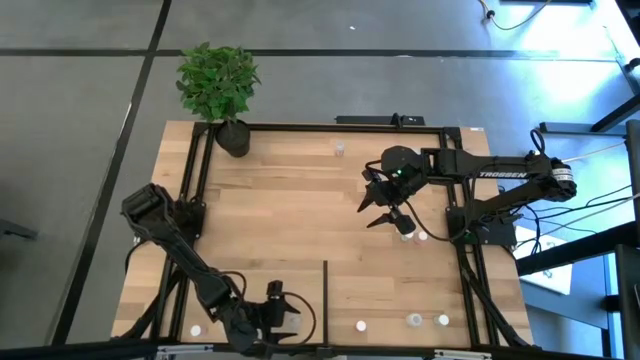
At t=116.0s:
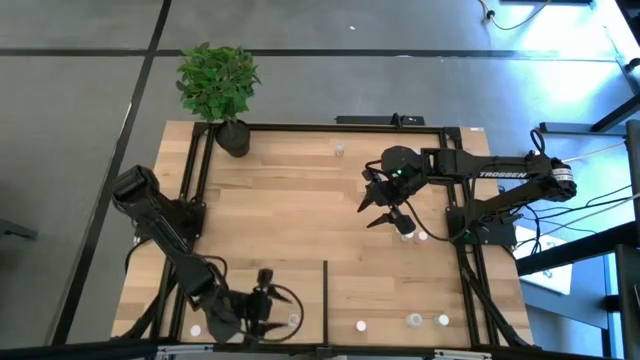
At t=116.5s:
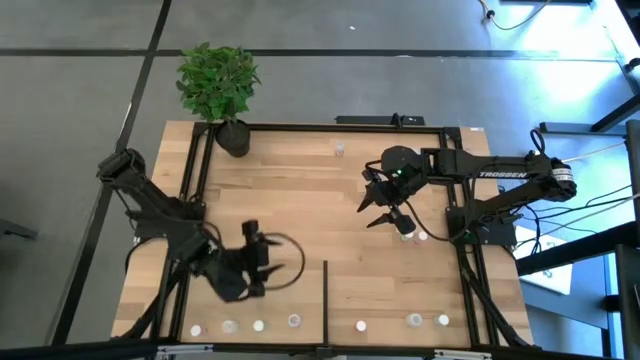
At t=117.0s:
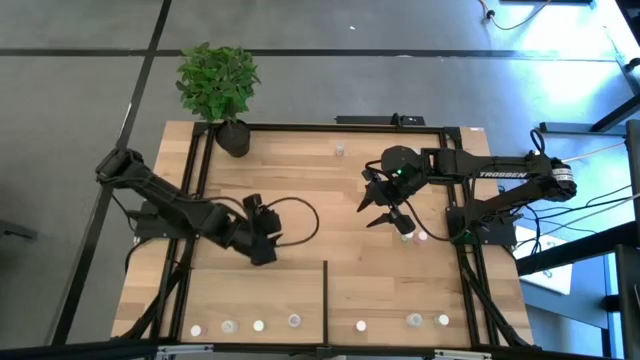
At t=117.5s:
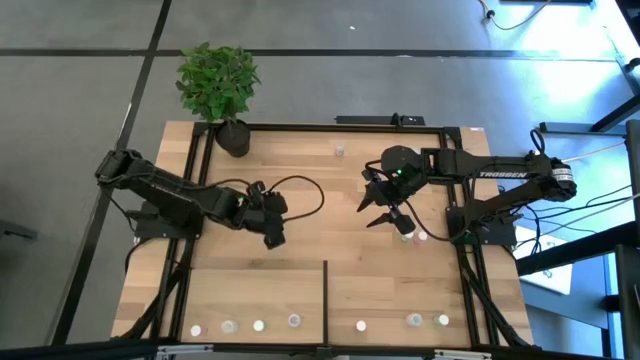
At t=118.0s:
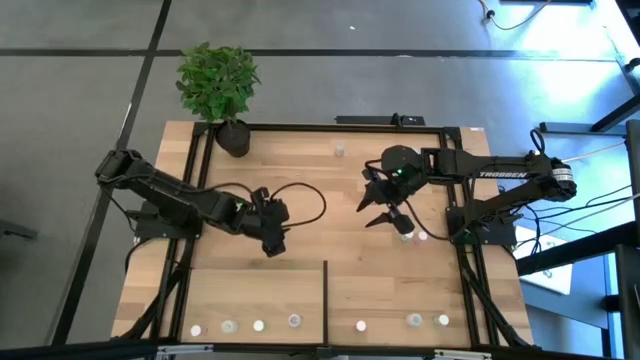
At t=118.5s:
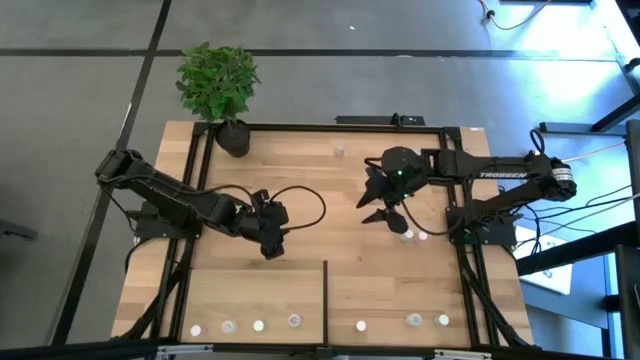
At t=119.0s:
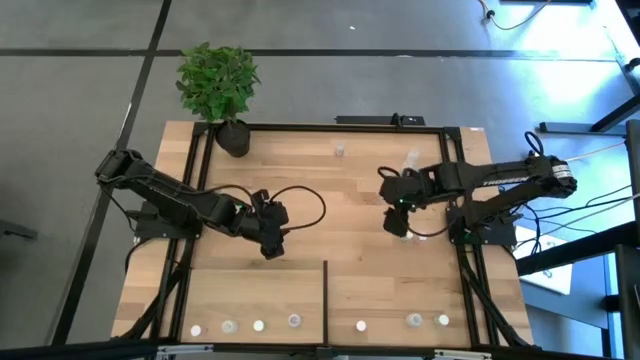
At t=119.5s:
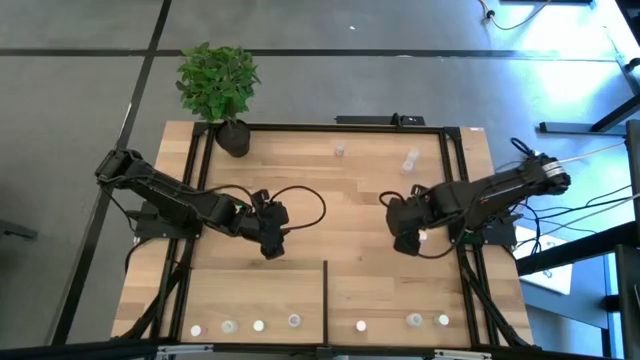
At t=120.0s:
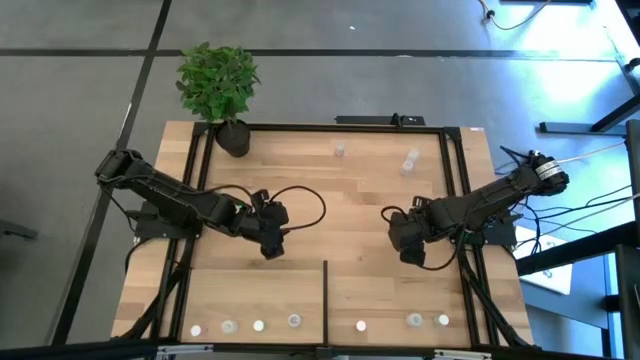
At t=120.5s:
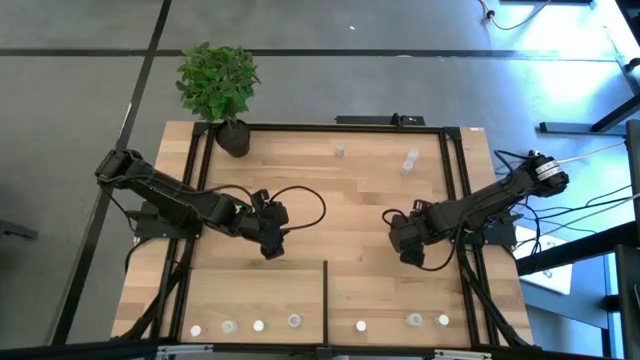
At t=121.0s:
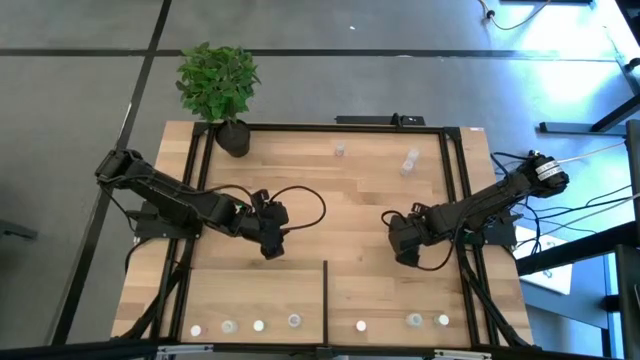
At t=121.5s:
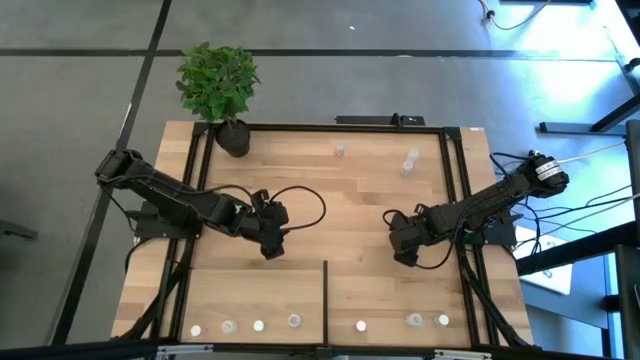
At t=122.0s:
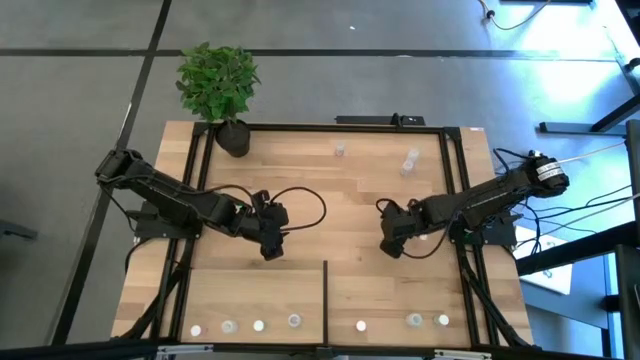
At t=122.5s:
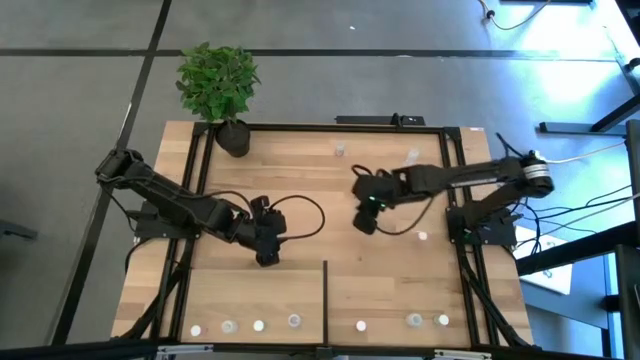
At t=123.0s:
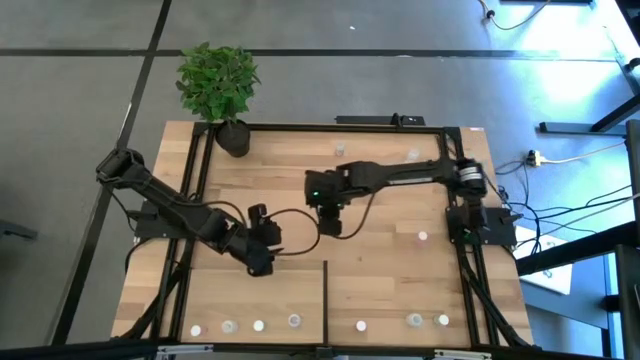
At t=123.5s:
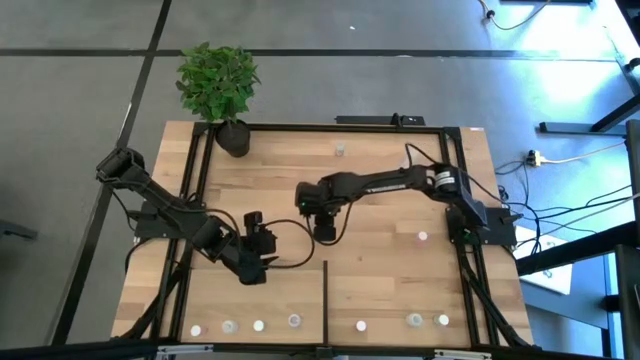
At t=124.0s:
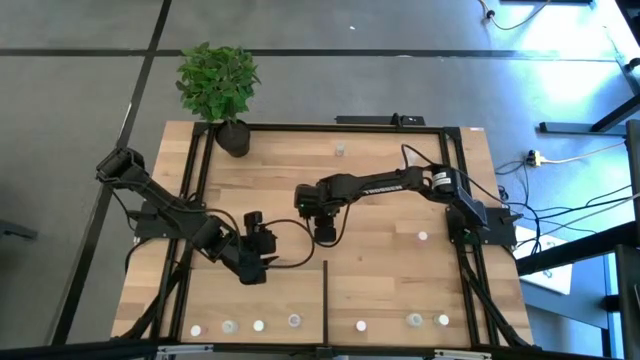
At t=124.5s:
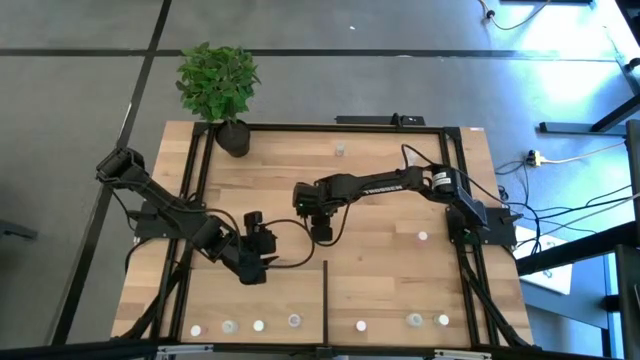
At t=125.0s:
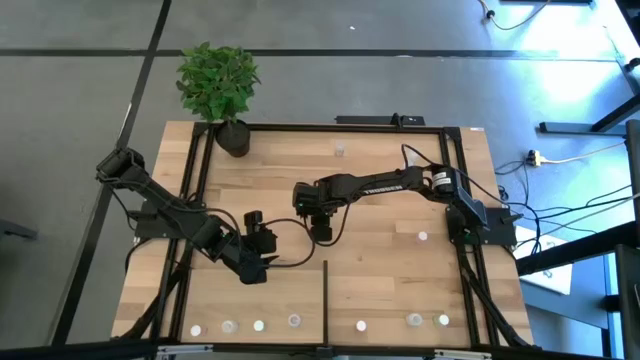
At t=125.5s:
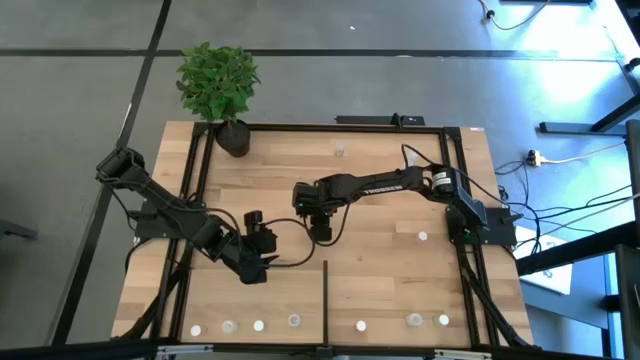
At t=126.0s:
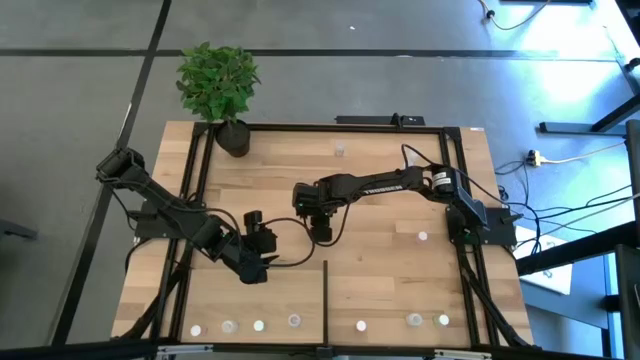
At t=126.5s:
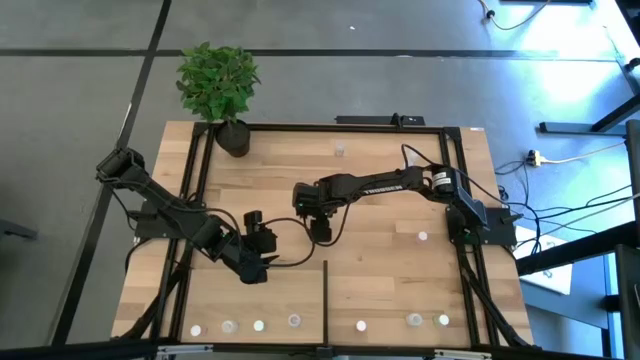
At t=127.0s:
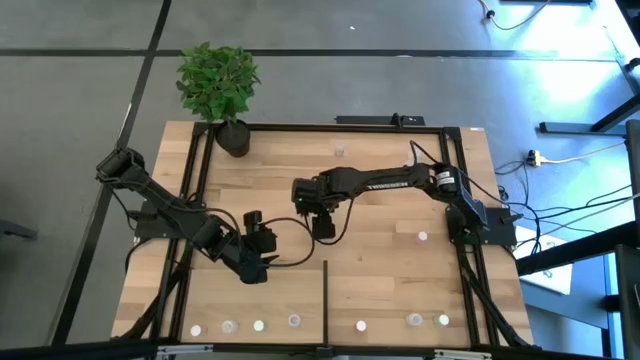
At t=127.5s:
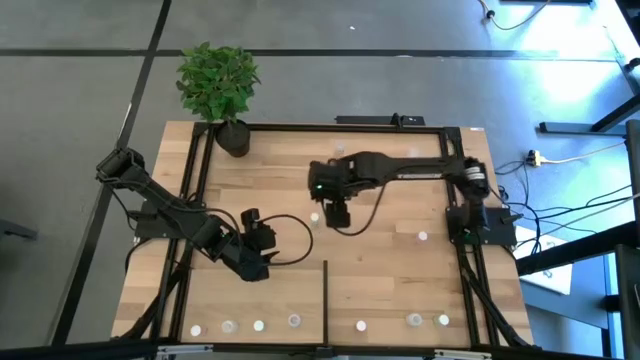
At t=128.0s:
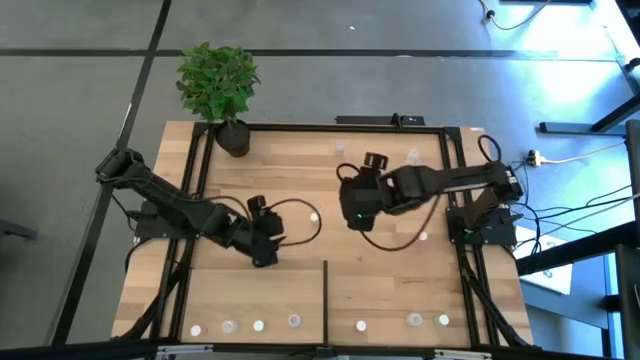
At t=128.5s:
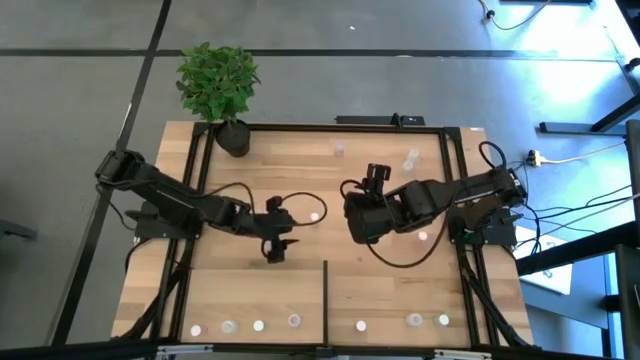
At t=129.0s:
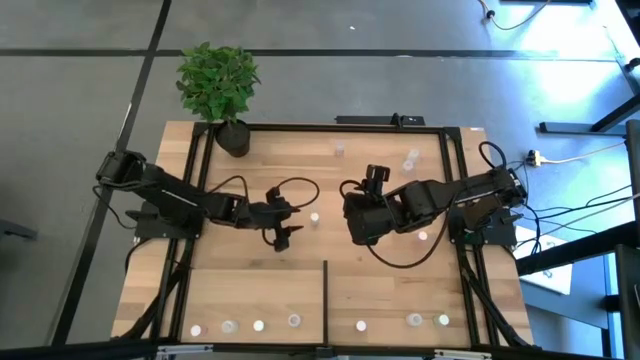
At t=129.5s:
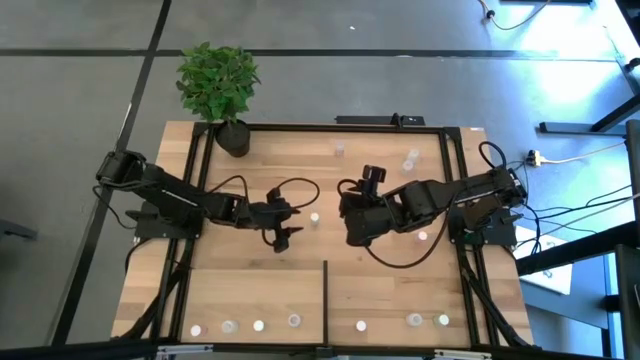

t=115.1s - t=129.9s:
Task: Pick and place medicine bottles onto shelf by color
Put the top green pill bottle on the shelf aligned with the other green pill bottle

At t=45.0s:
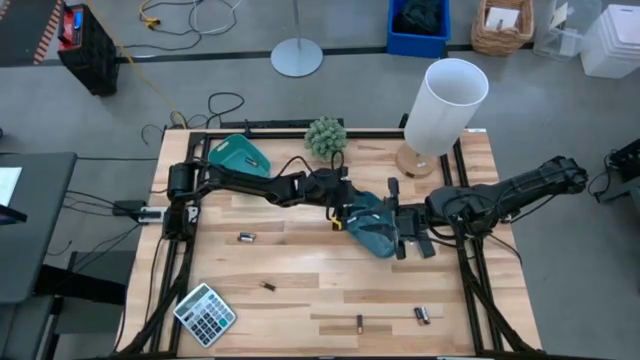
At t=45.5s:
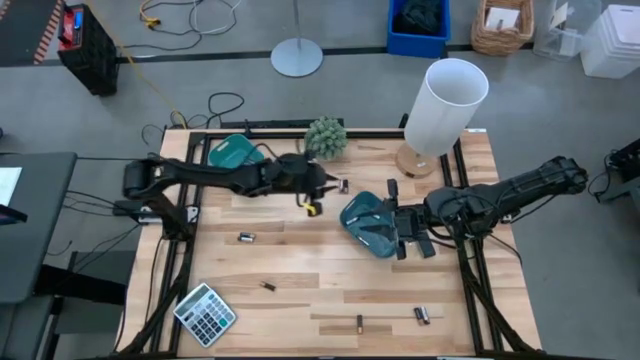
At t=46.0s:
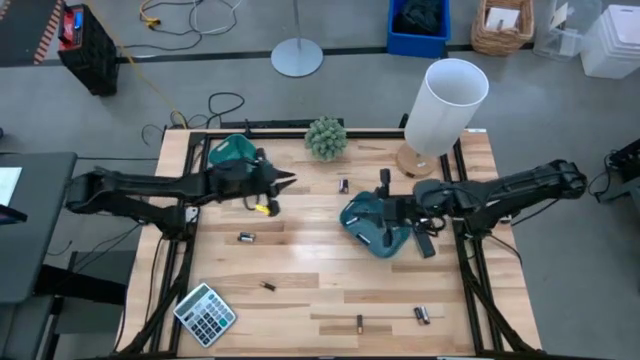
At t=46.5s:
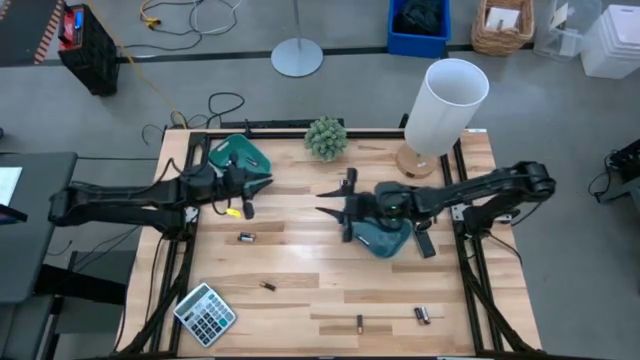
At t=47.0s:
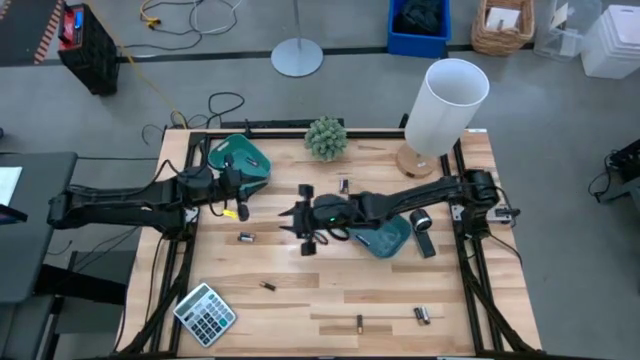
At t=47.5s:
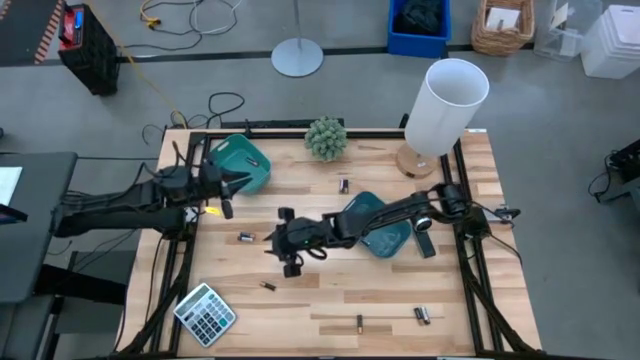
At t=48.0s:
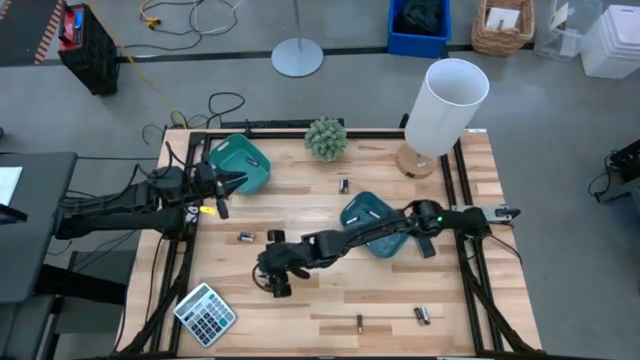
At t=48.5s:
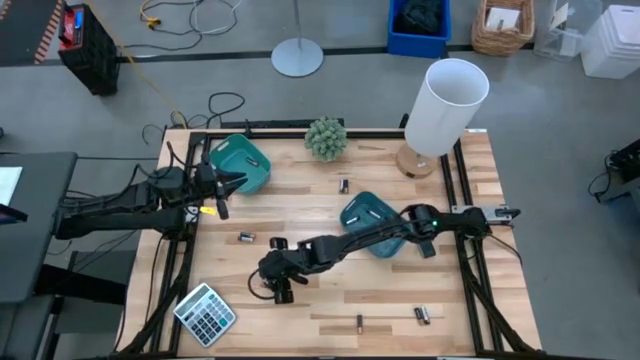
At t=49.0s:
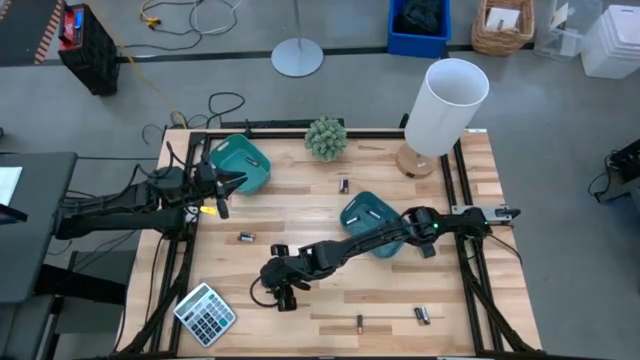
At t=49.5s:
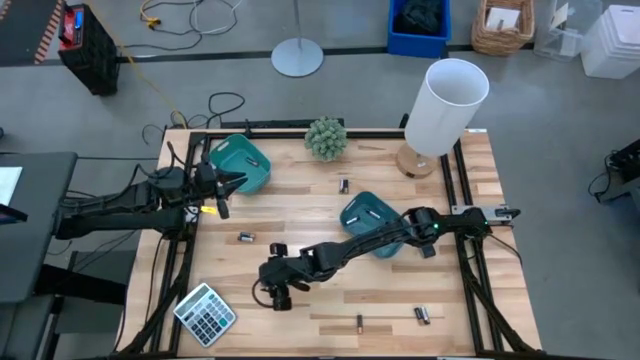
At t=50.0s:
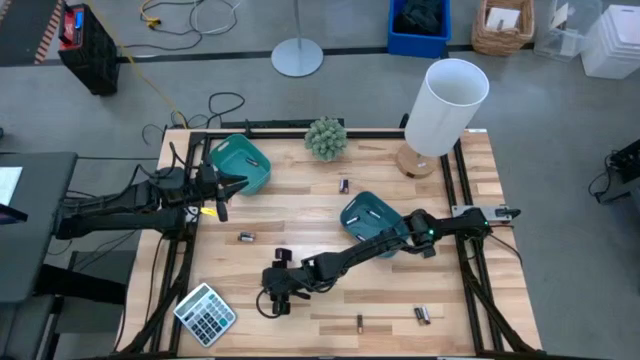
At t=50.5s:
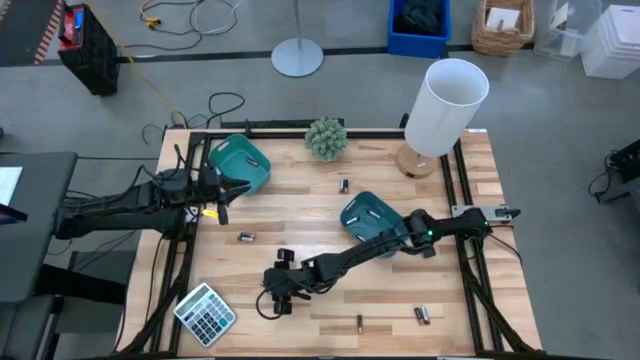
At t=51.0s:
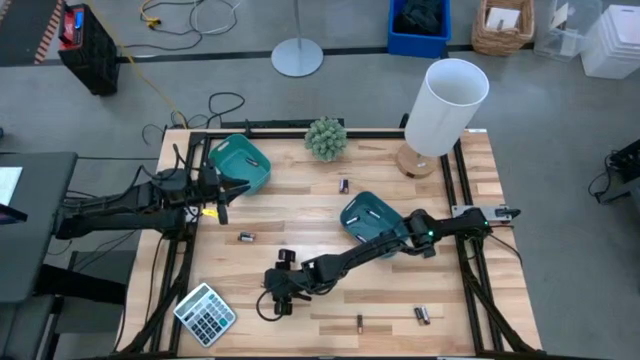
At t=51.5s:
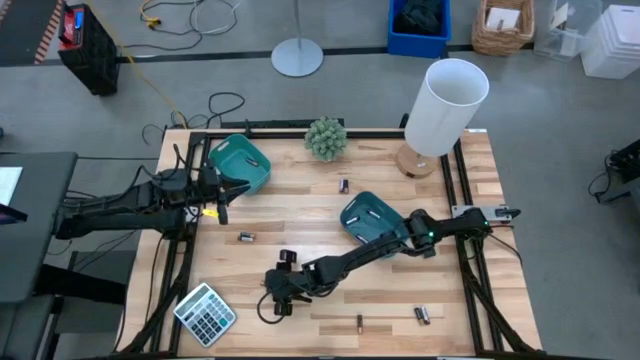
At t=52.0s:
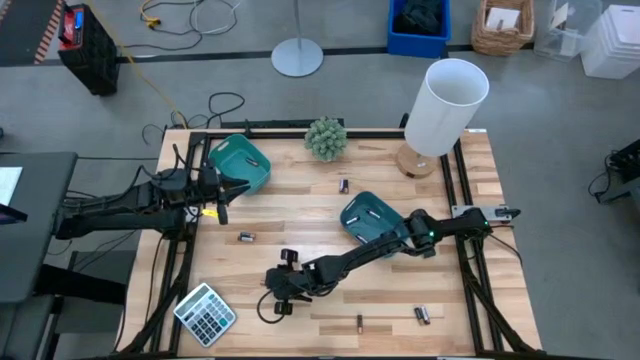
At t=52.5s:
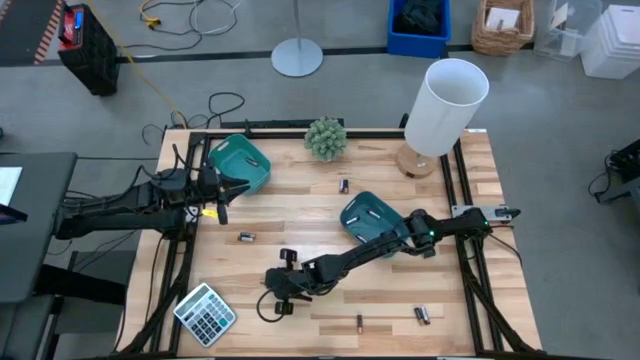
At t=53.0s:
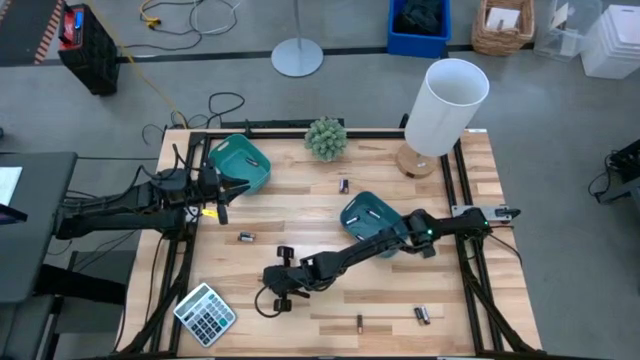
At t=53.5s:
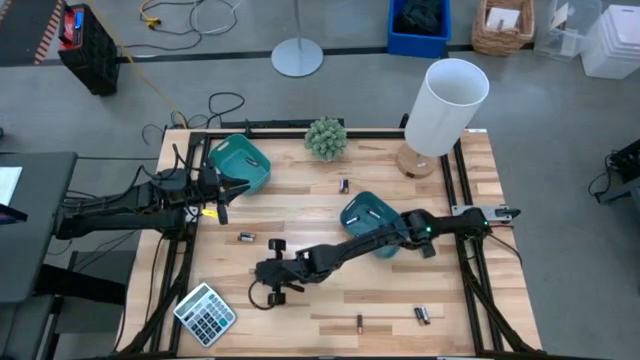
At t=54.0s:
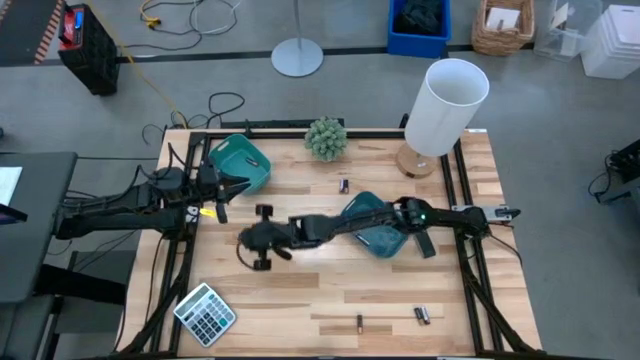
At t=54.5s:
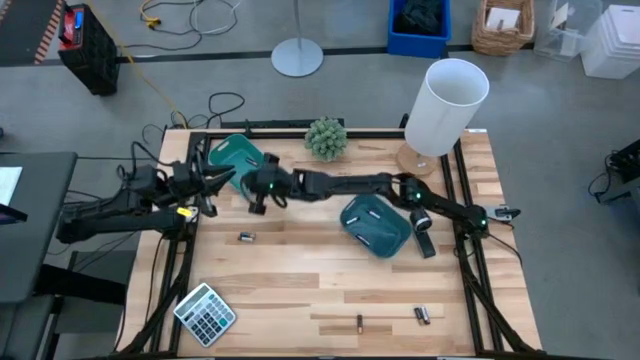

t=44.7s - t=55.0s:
Task: Sort batteries
Put the black battery into the green bin
